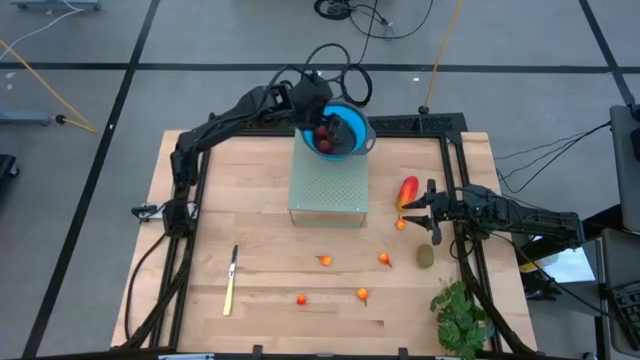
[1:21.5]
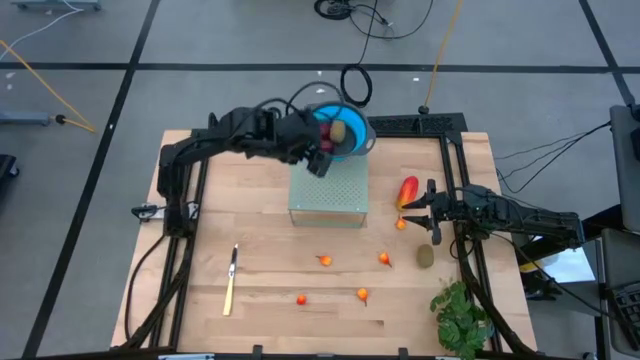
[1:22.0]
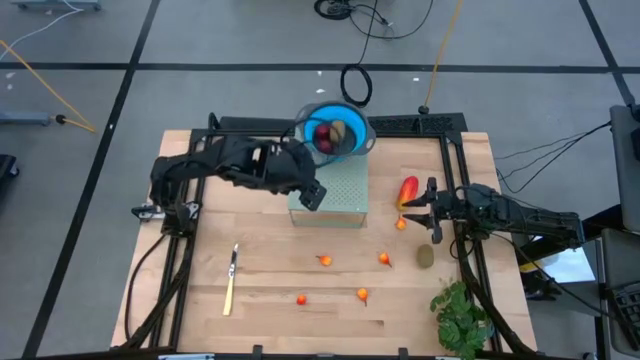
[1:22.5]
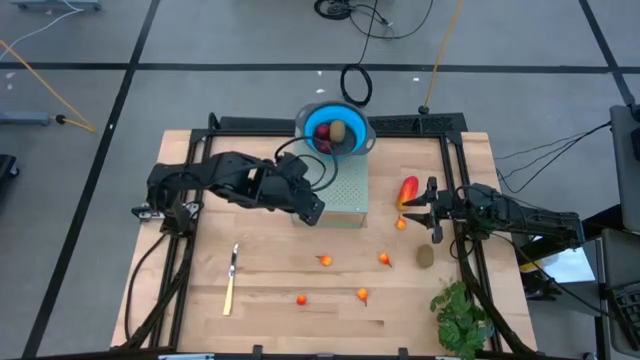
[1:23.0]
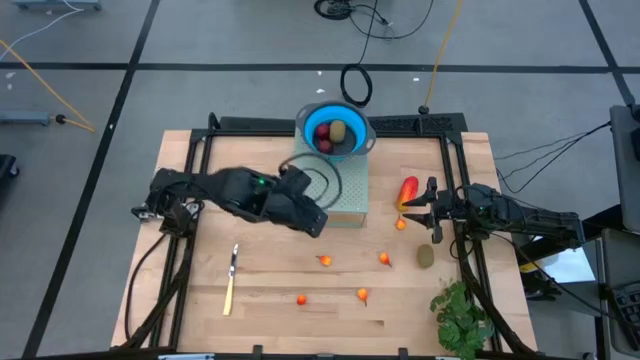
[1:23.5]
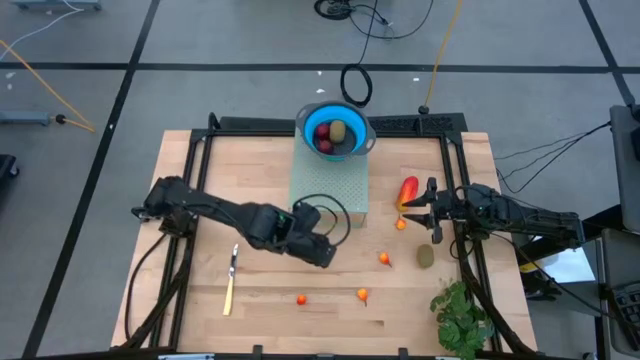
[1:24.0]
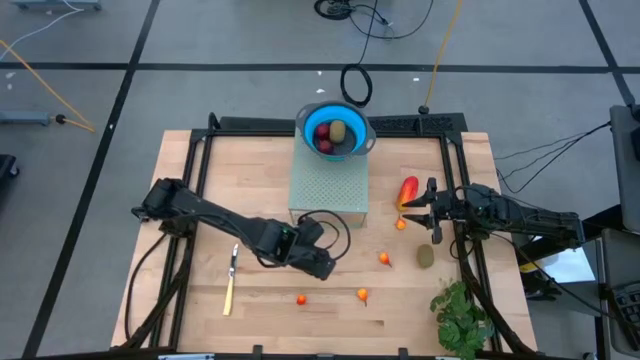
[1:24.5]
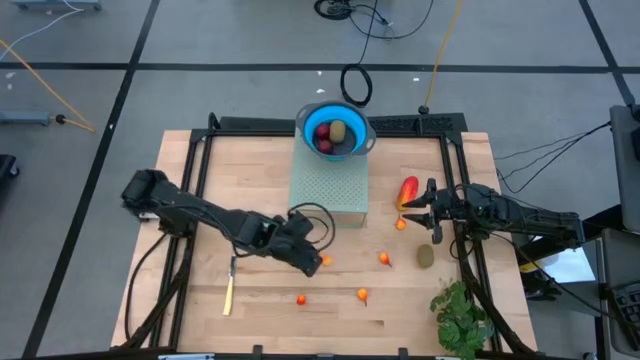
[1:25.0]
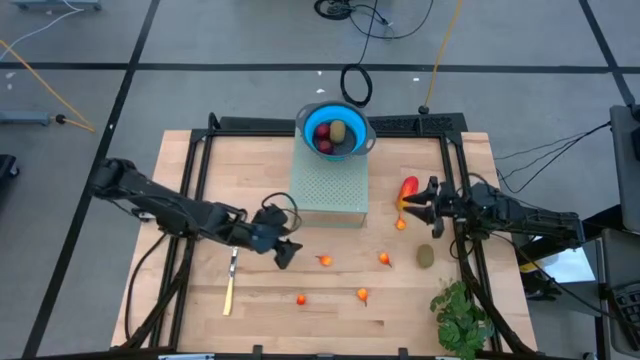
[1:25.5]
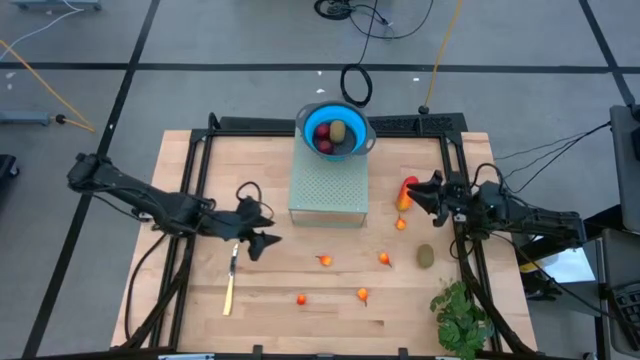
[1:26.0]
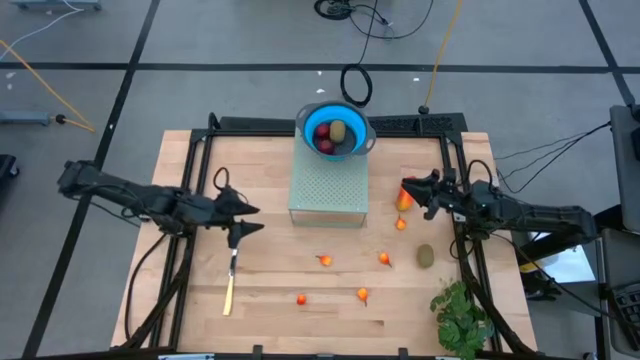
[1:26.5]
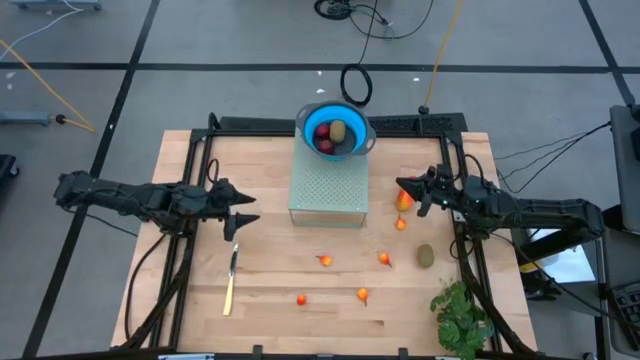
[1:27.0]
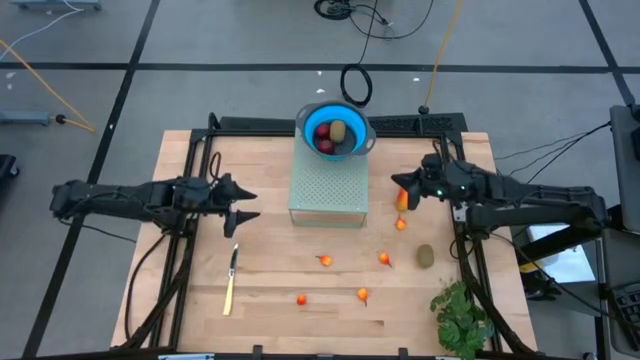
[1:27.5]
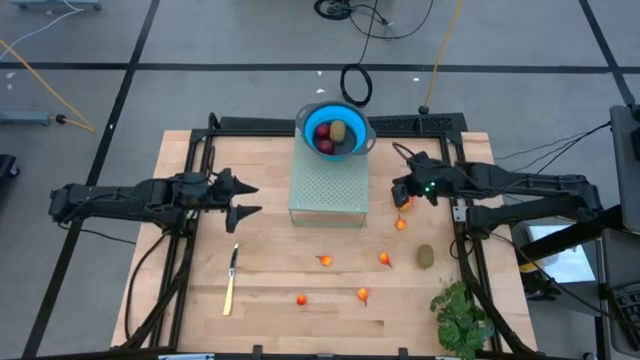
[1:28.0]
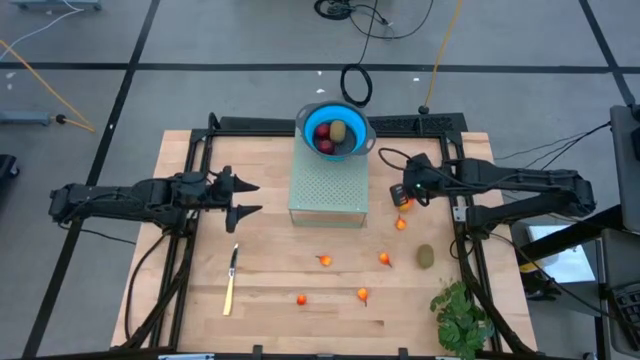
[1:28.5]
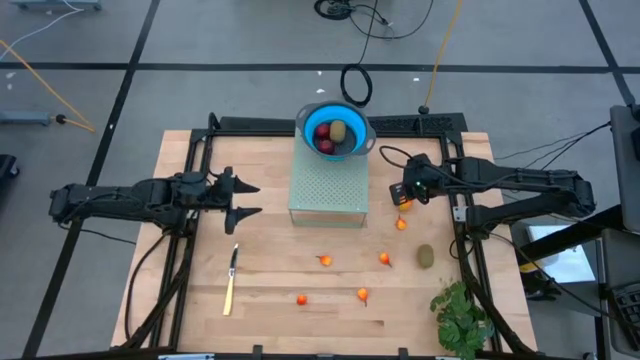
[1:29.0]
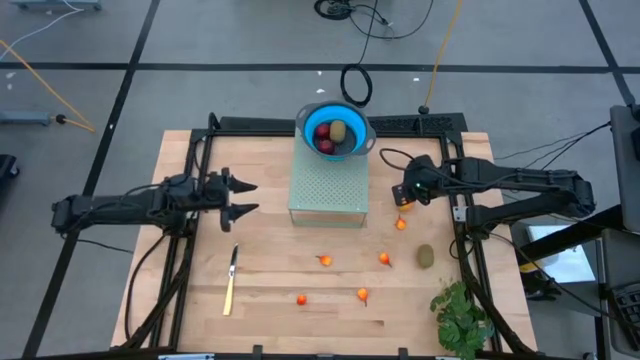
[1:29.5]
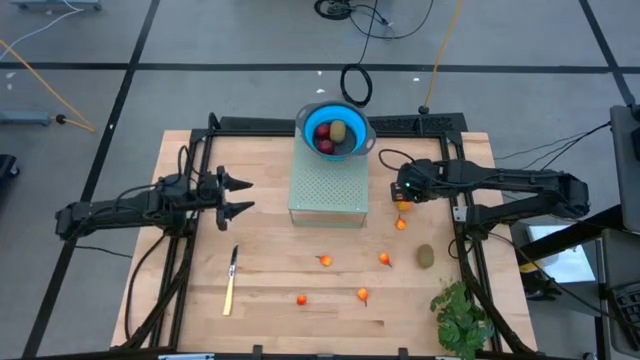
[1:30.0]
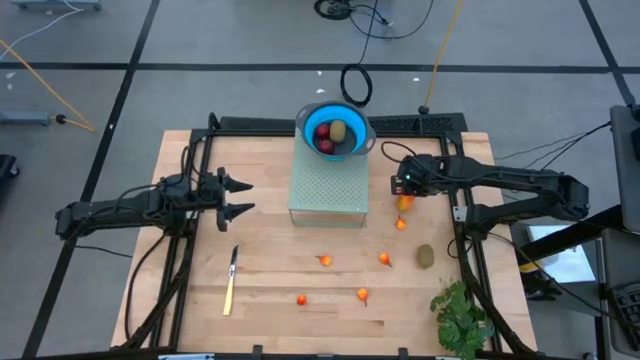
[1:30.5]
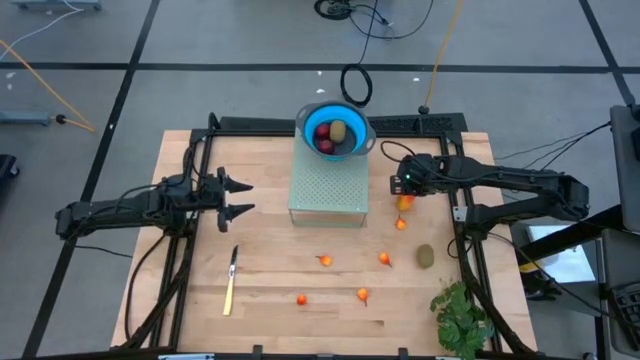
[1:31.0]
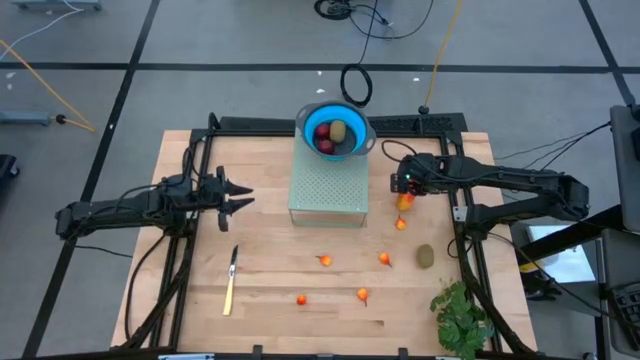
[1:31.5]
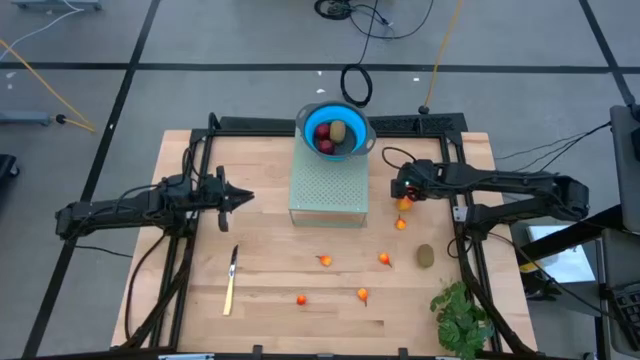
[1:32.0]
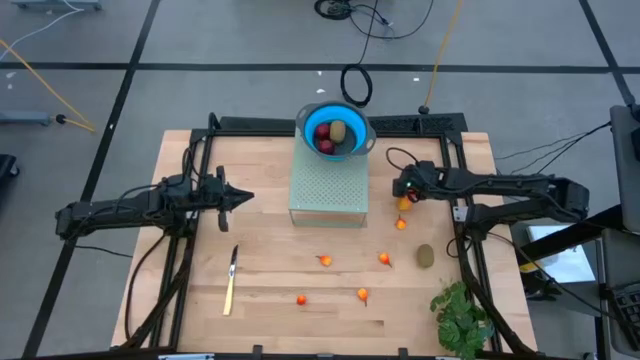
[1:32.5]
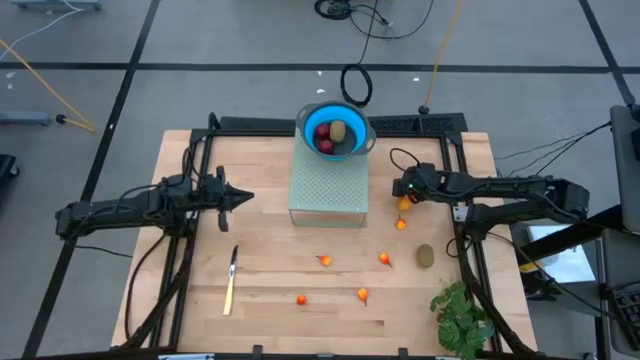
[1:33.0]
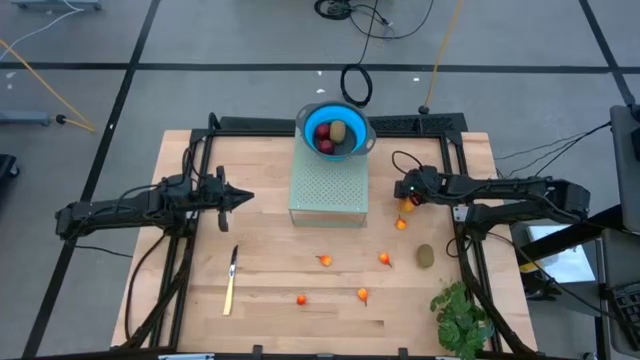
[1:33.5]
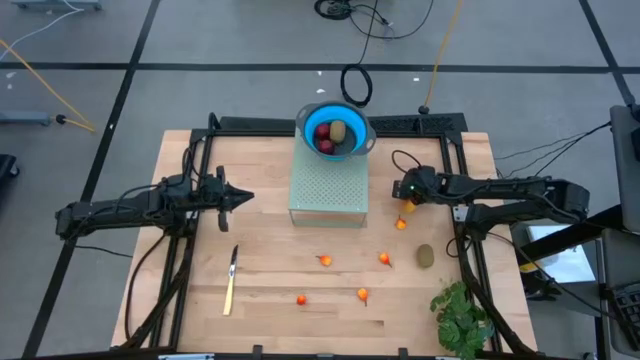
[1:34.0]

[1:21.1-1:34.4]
Task: Pick & Place Fruit
Put the mango into the blue strainer bowl on the shelf

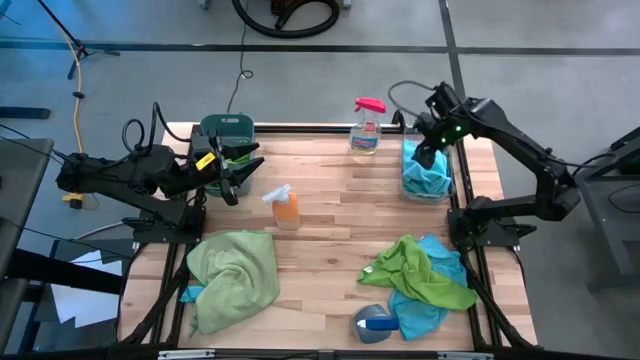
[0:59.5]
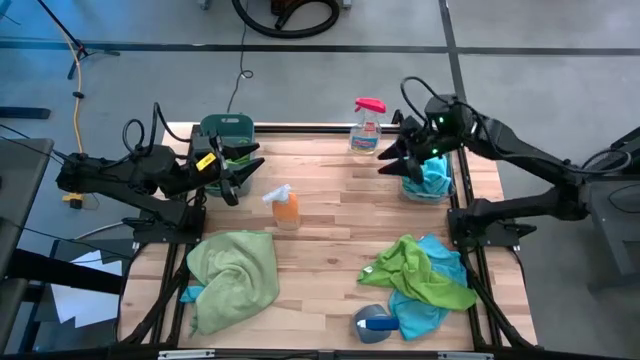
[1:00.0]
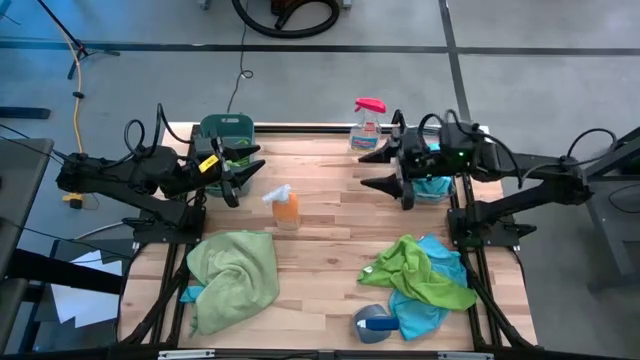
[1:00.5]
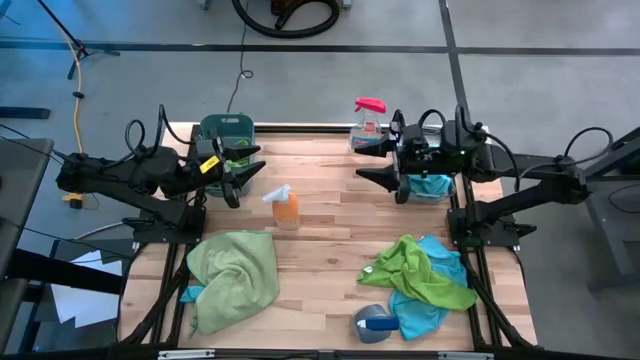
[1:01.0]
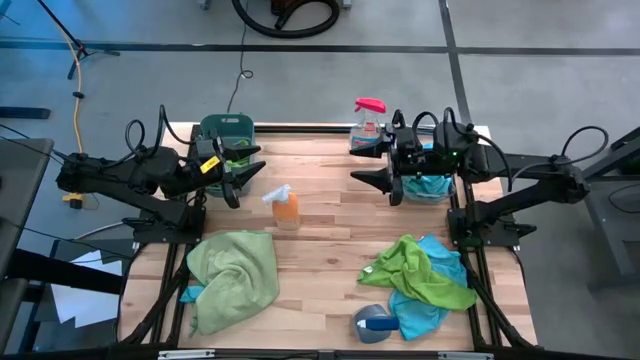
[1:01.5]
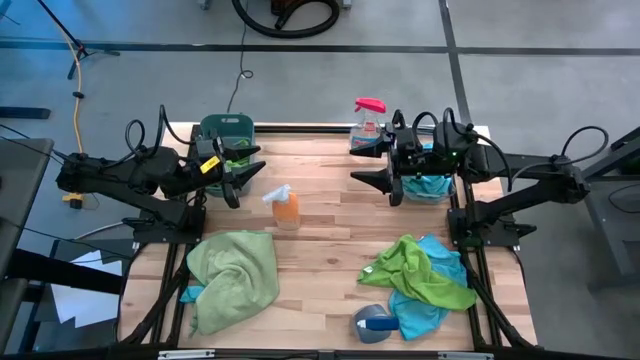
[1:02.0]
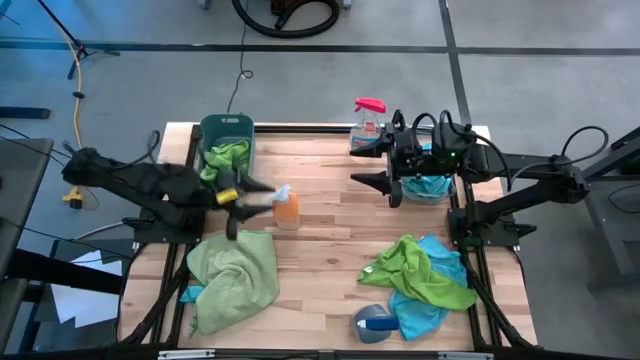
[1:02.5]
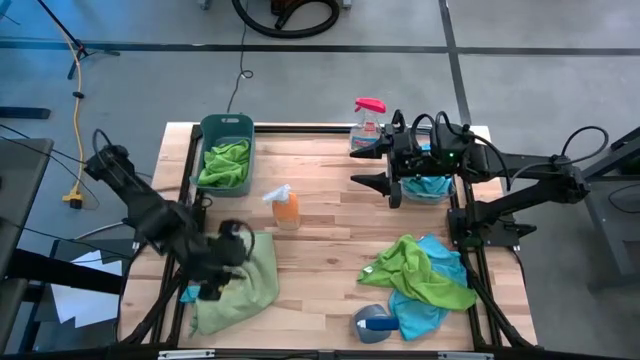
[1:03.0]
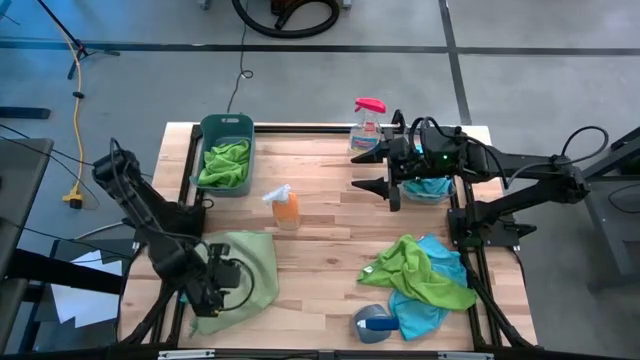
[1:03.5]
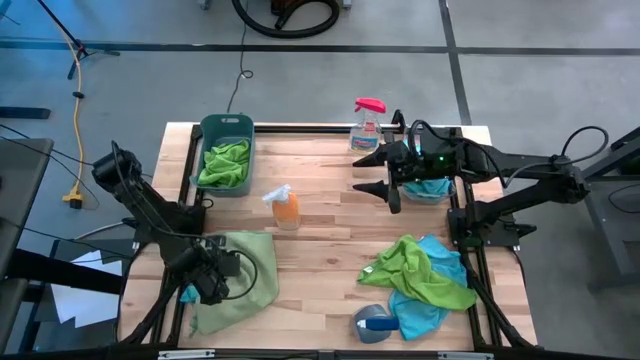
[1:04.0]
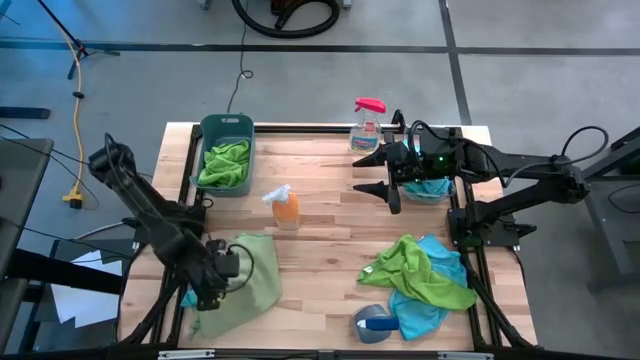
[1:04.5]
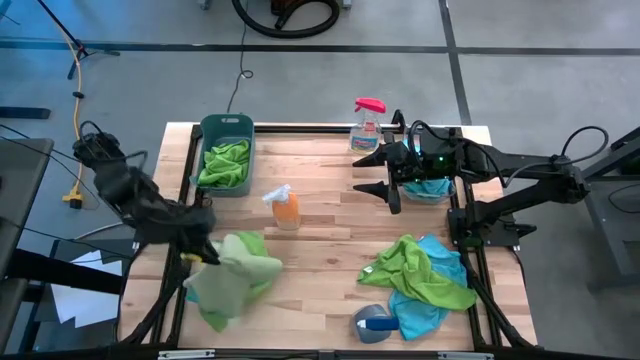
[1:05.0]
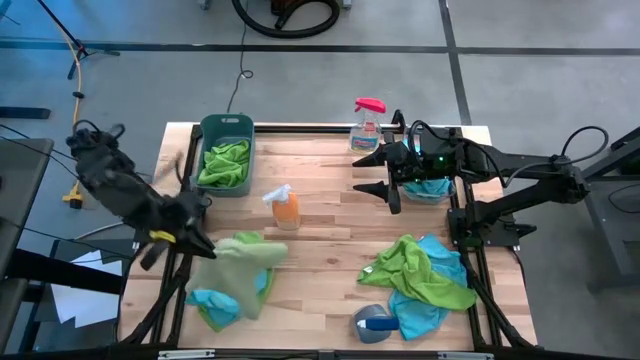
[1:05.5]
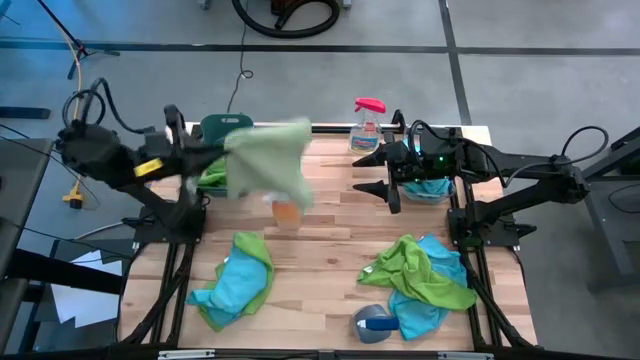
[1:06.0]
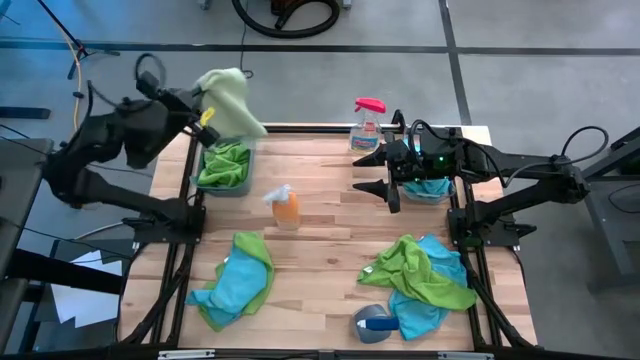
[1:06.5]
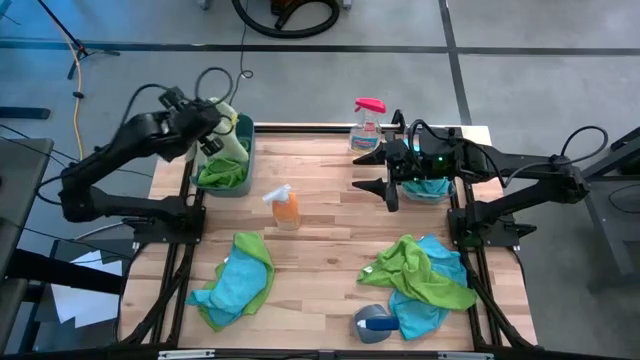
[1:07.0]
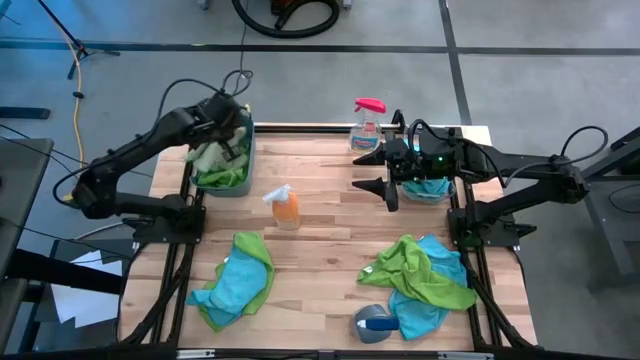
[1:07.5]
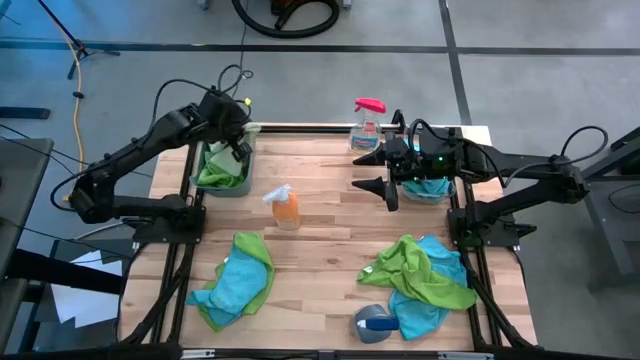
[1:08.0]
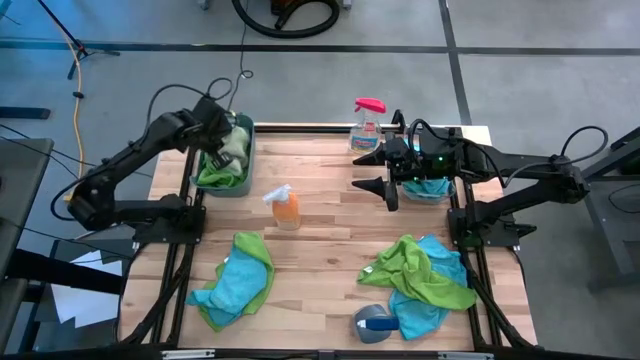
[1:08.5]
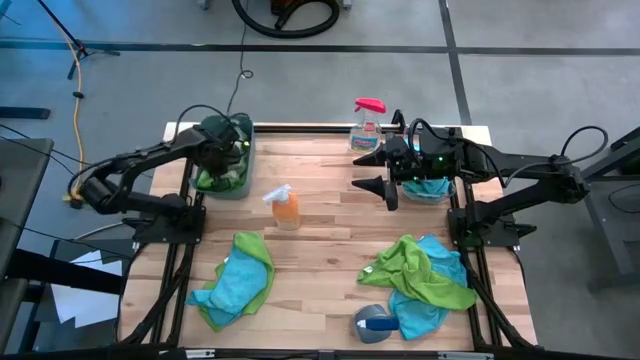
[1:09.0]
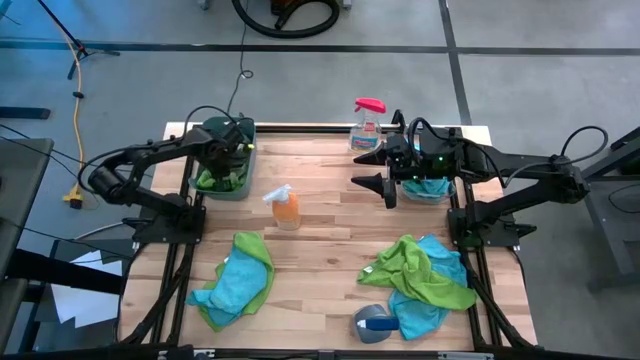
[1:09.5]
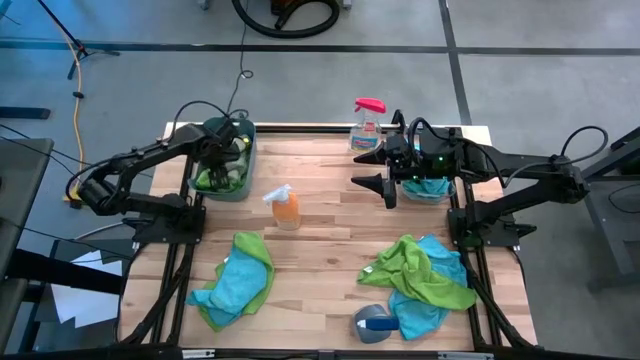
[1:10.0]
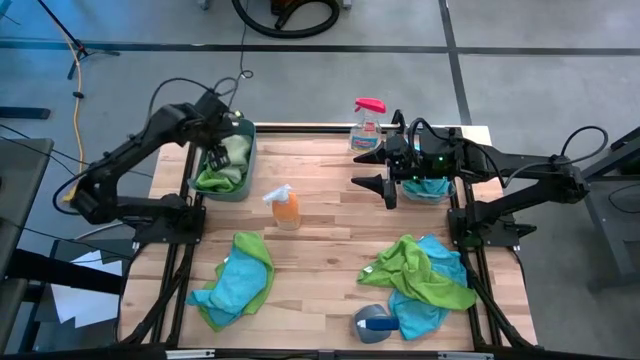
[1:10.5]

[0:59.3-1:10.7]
Task: Sort microfiber towel by color & place in baskets
Put the light green microfiber towel into the green bin
